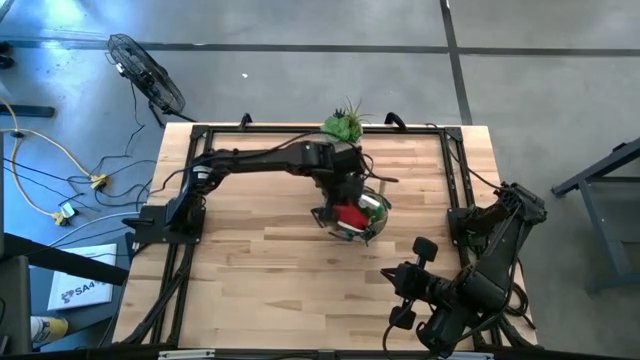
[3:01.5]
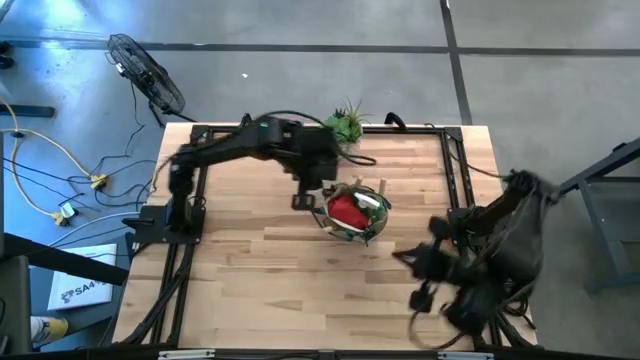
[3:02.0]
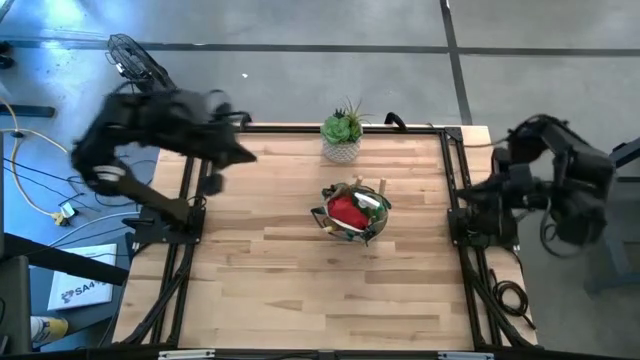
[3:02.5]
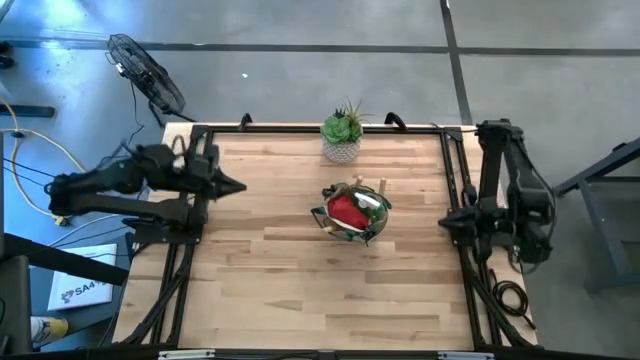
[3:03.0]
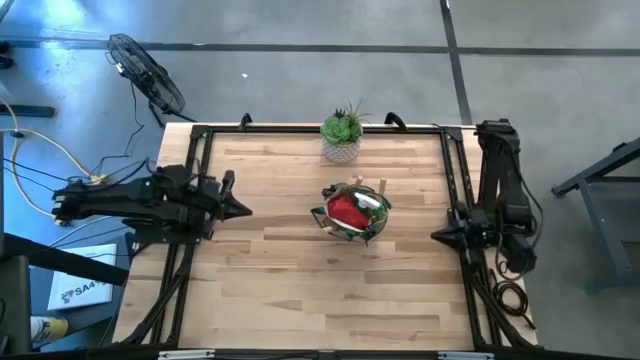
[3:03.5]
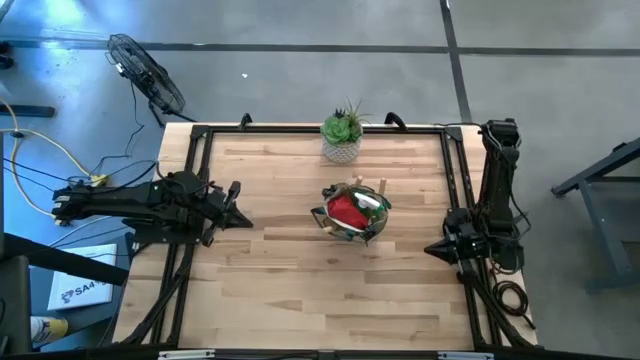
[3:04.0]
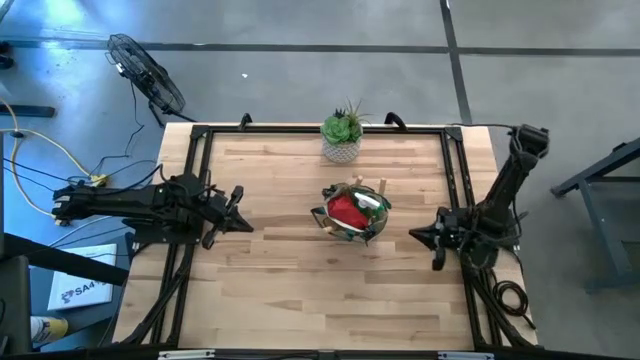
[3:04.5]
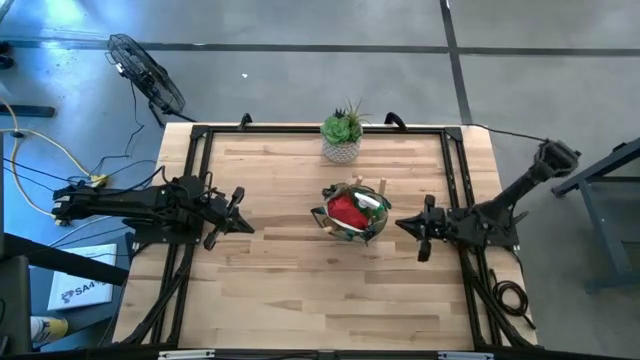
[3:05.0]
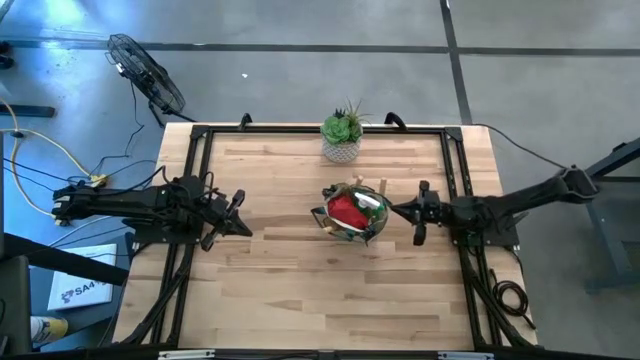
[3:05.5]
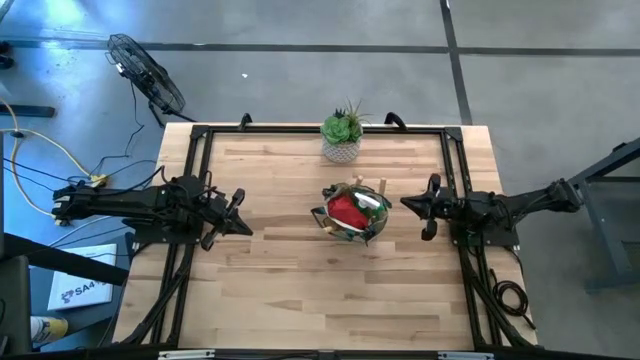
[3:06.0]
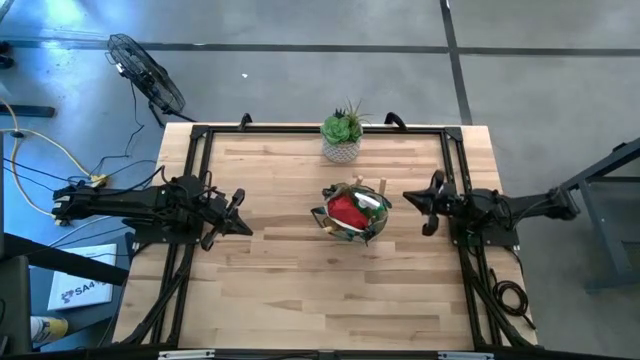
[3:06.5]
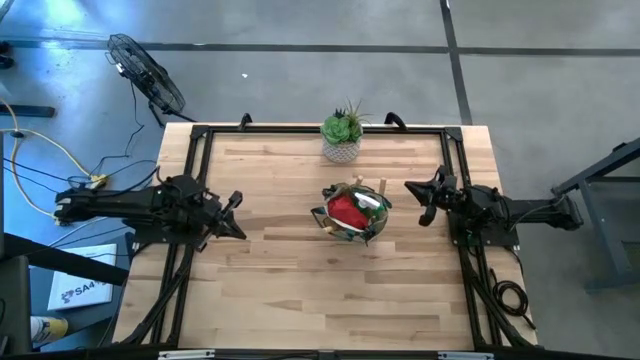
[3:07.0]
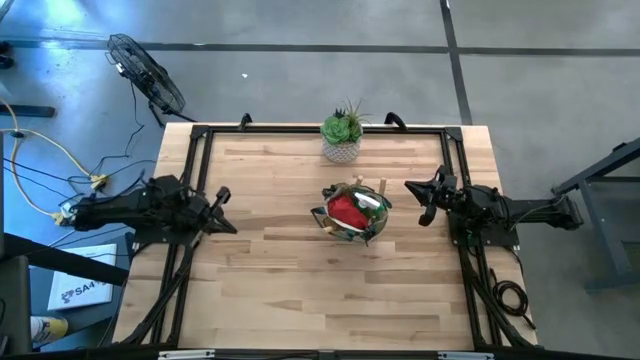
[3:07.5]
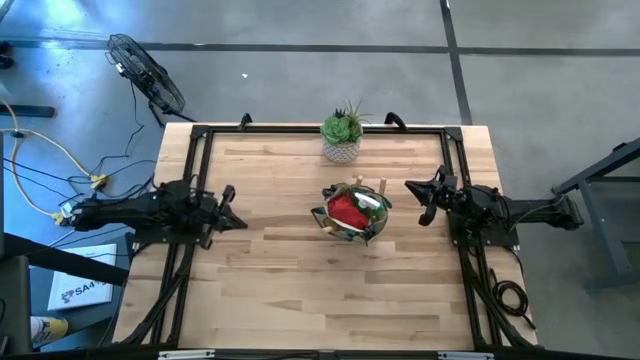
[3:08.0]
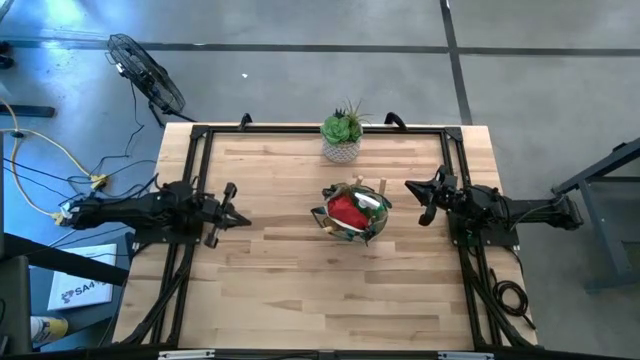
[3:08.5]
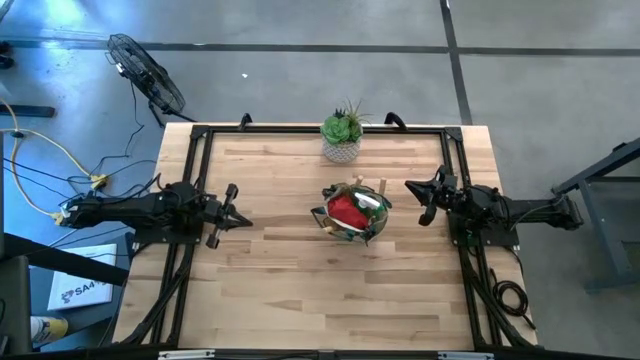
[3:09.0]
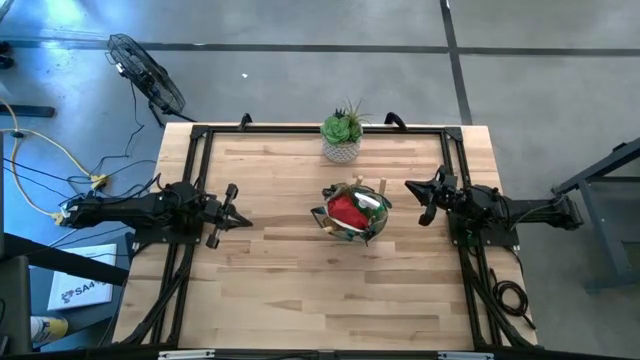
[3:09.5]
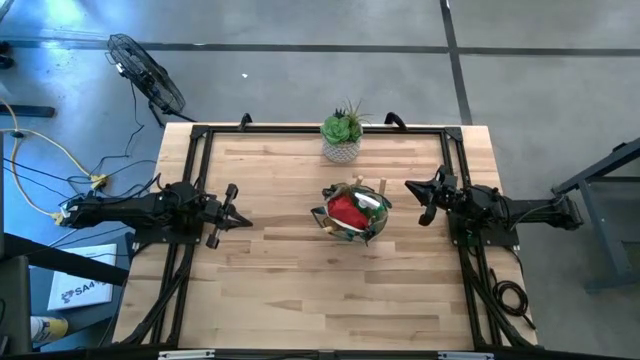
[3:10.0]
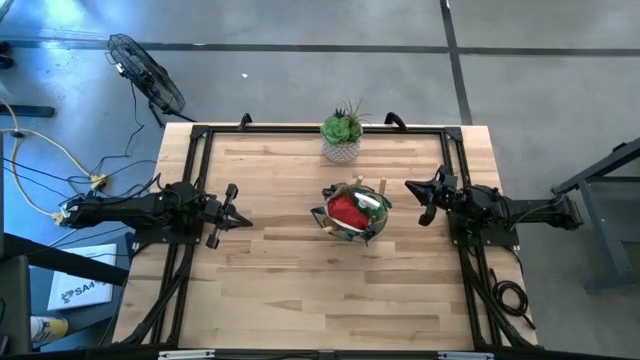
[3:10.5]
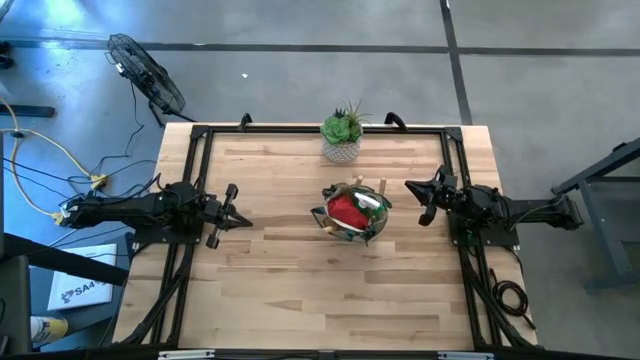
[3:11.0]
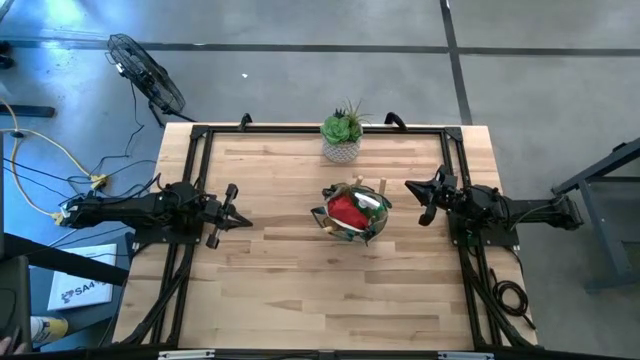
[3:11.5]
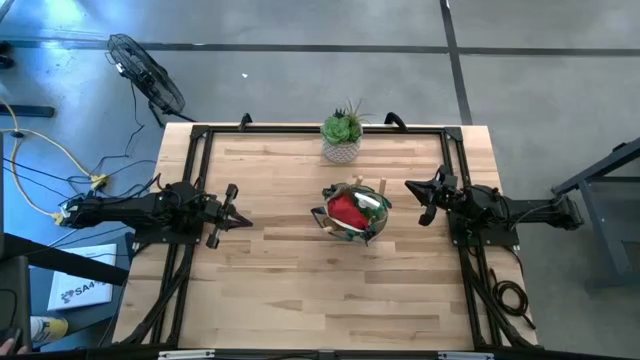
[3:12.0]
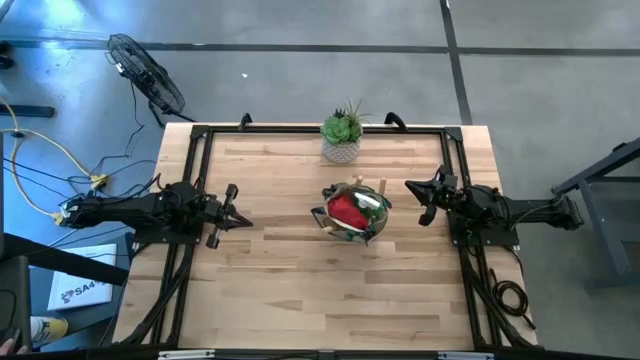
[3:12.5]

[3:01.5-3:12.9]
Task: Pick & Place Garden tools in Gardening bag
Return to Home Position

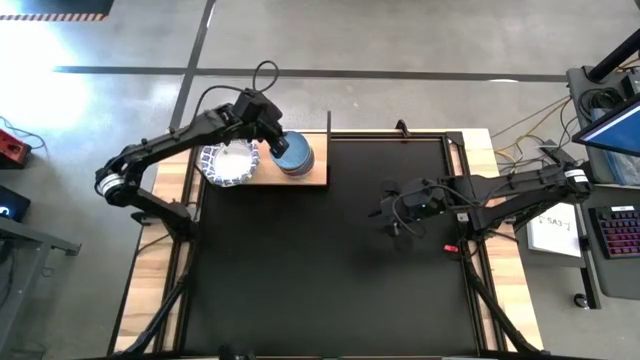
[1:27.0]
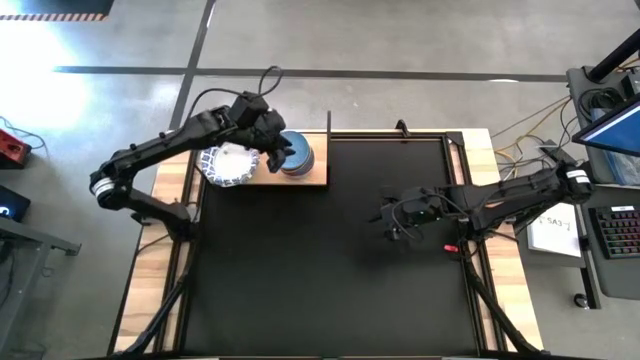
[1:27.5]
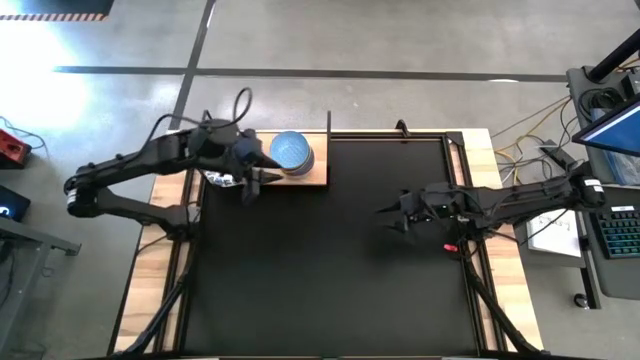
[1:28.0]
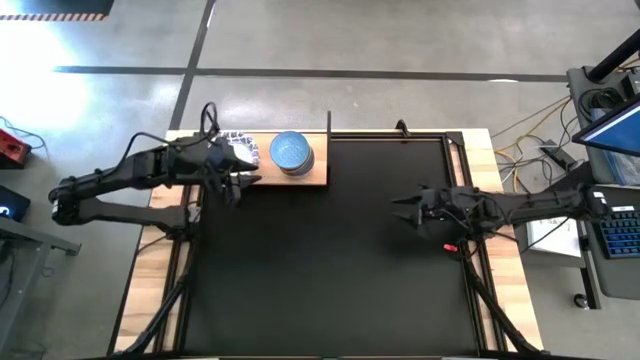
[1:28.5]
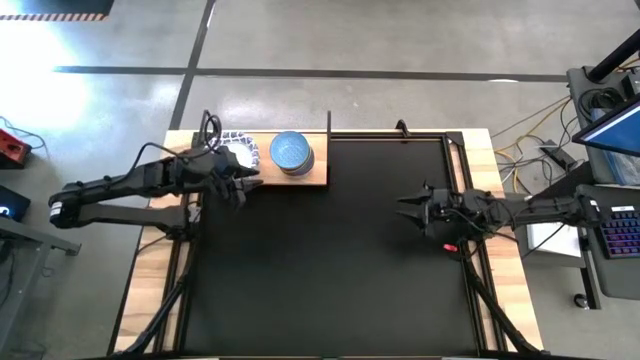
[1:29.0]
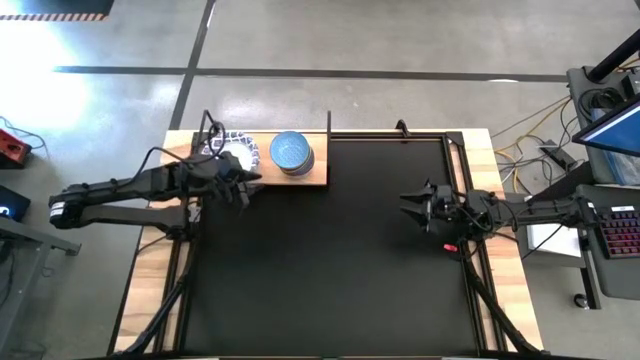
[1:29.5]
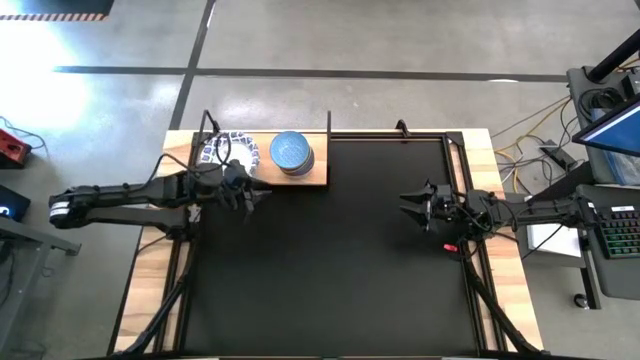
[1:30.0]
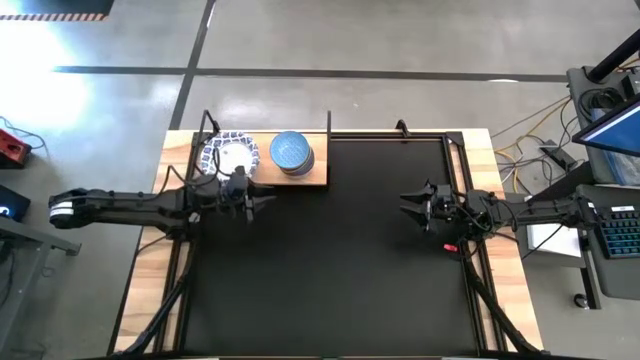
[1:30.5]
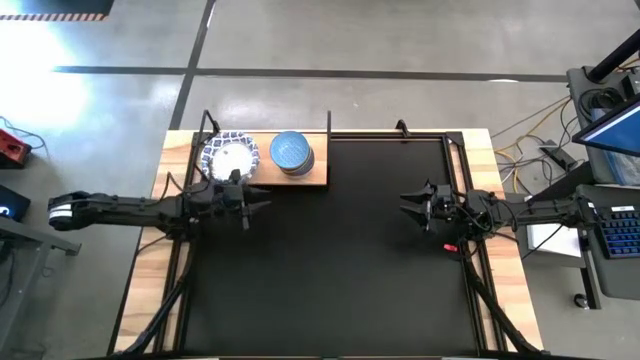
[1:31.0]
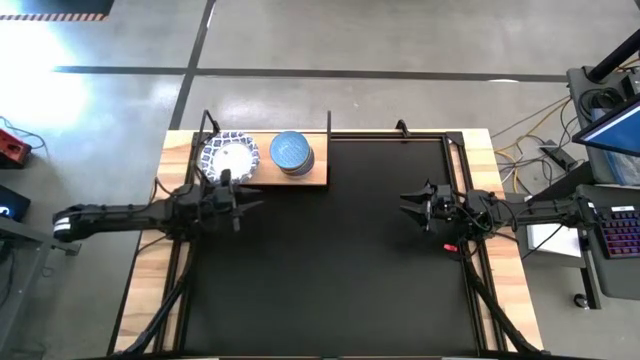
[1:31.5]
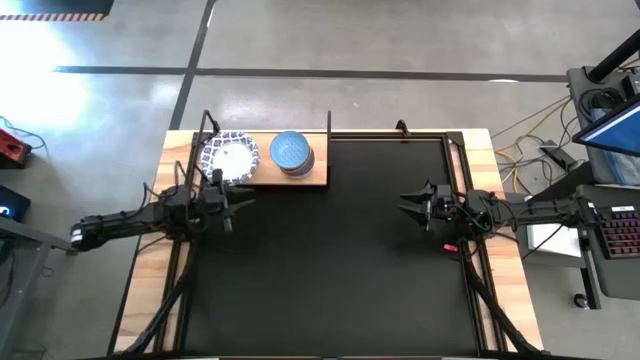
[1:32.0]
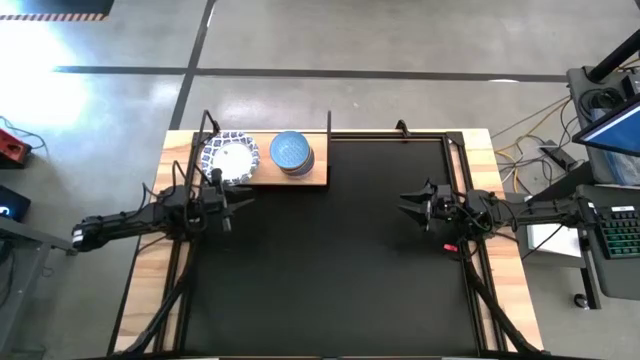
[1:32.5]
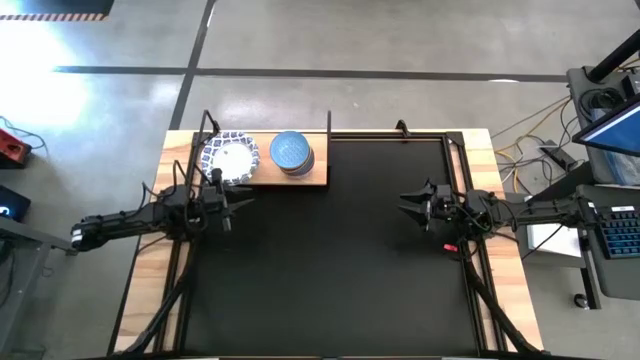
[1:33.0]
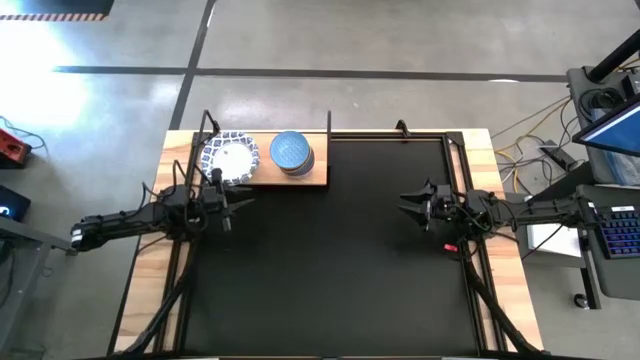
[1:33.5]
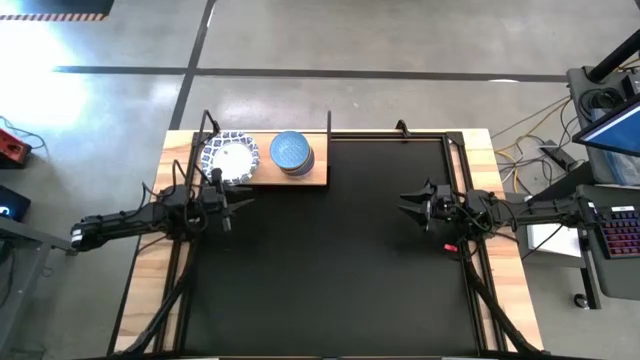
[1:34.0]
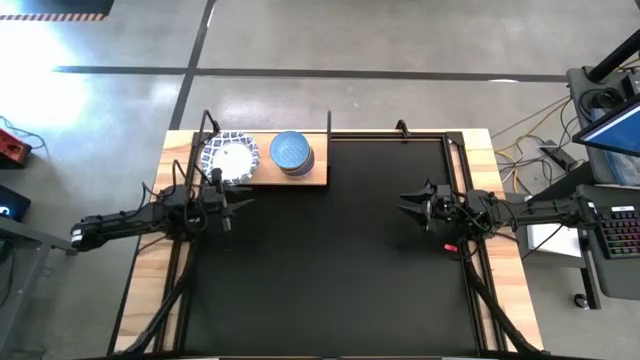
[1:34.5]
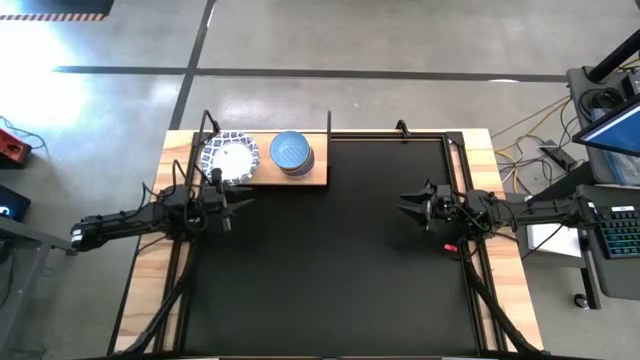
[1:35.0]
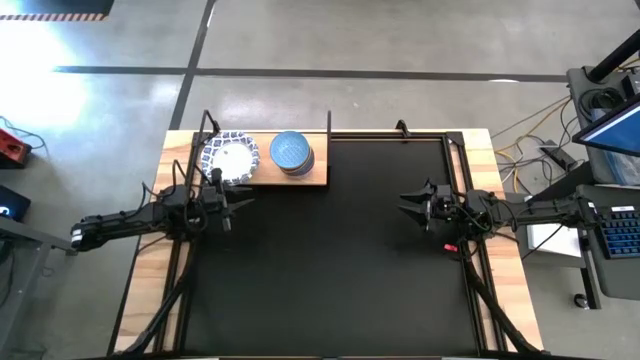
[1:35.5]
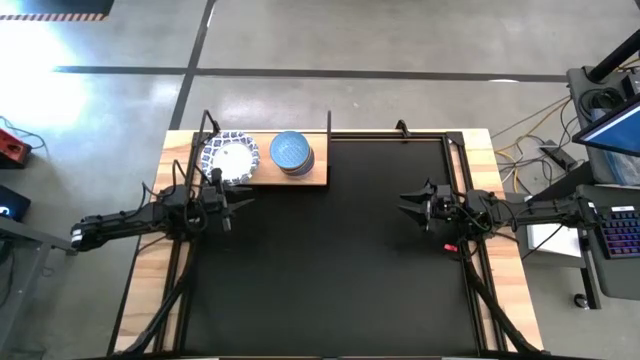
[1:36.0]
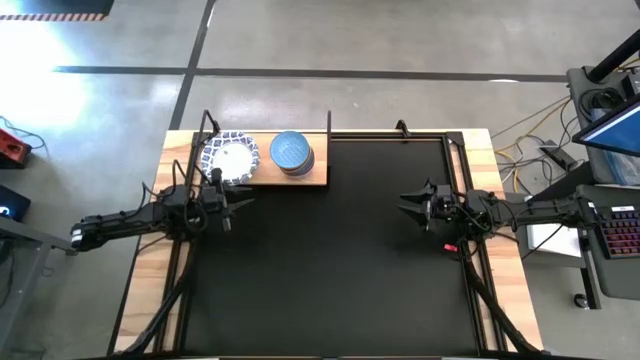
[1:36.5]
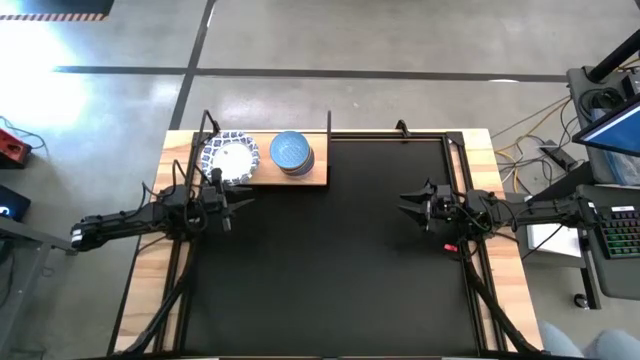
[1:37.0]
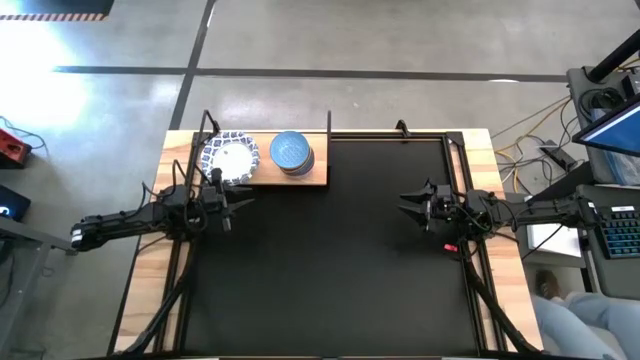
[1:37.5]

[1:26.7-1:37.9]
Task: Place and stack bowls onto a shelf
Return to Home Position
